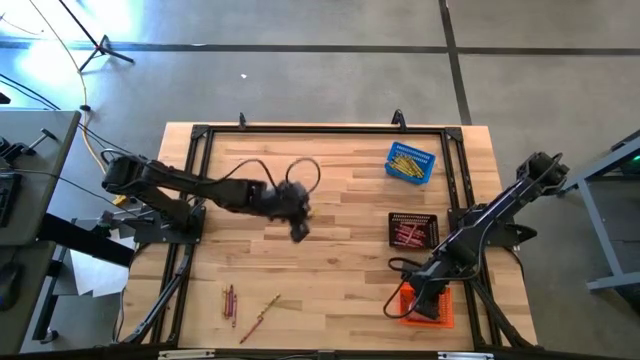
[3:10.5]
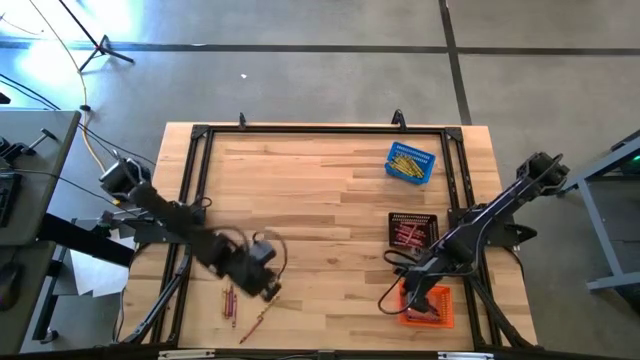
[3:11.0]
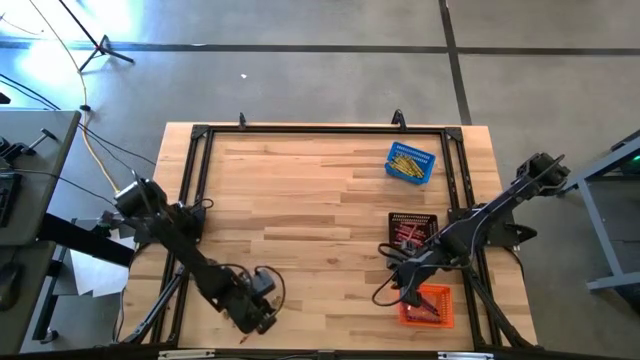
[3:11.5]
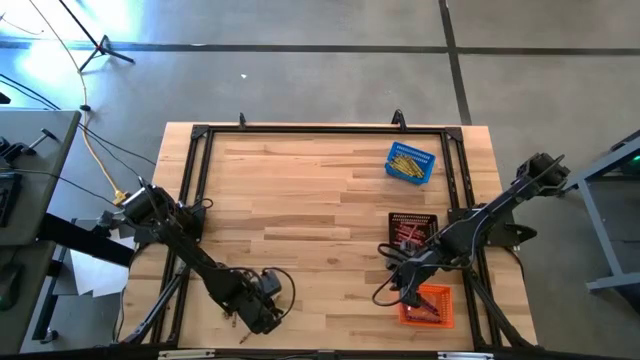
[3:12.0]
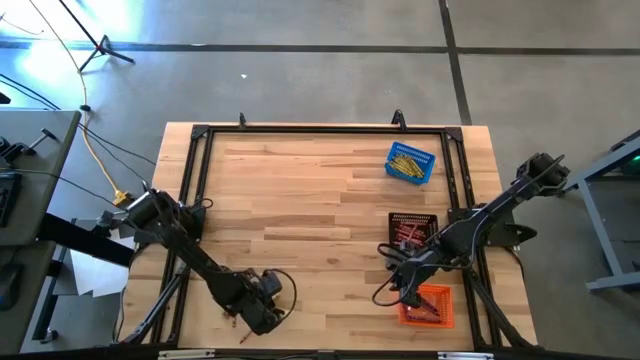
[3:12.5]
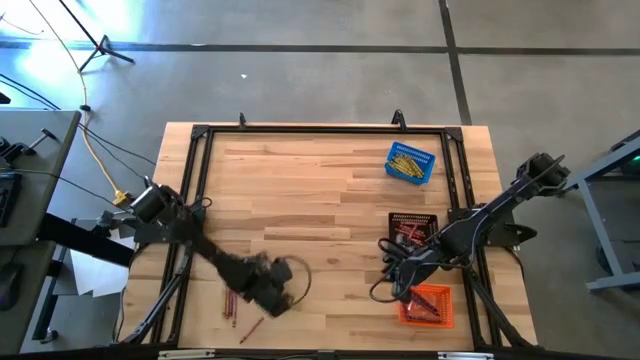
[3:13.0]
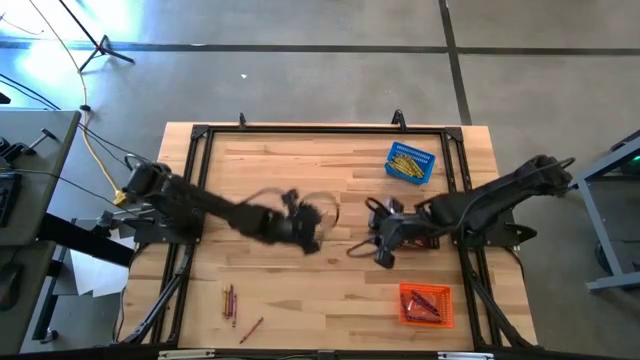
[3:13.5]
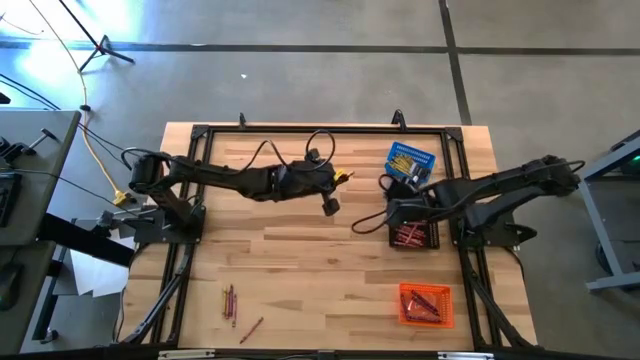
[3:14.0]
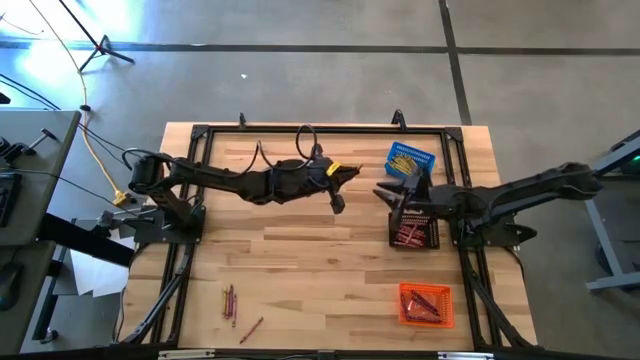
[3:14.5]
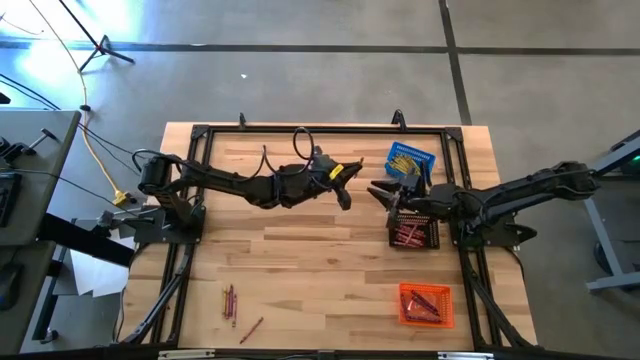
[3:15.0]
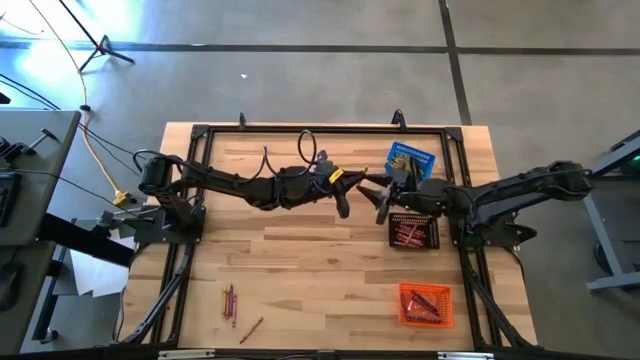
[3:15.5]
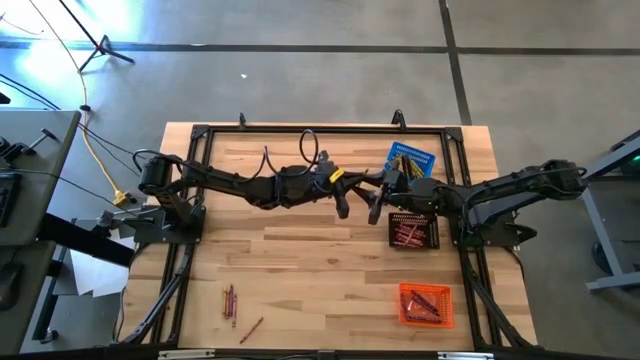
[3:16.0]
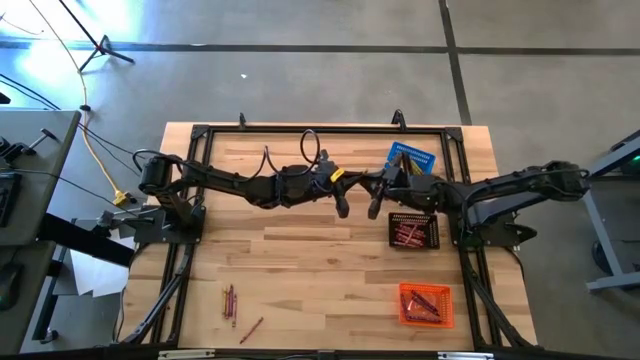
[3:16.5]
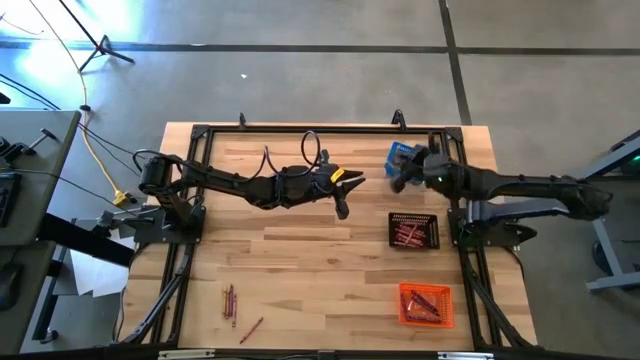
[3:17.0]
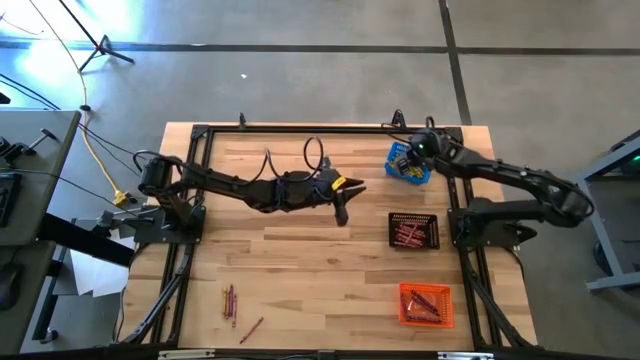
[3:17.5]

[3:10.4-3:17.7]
Task: Sort crayons
Put the yellow crayon into the blue bin

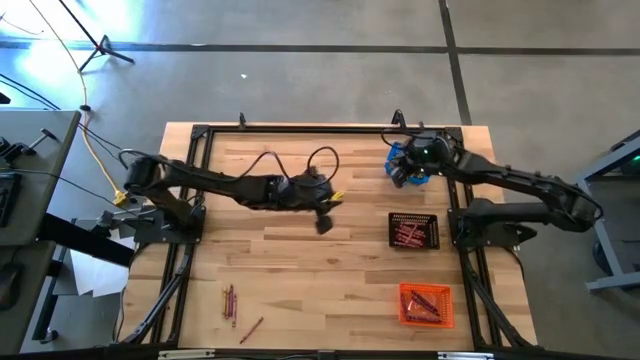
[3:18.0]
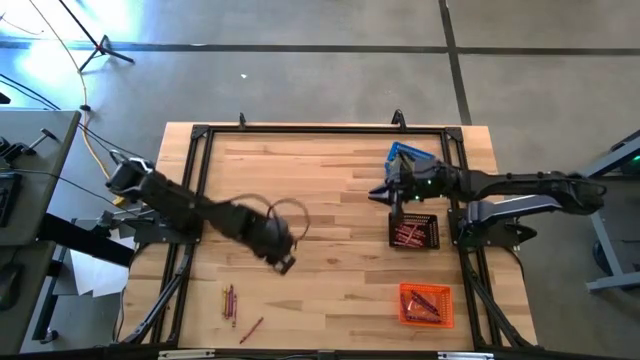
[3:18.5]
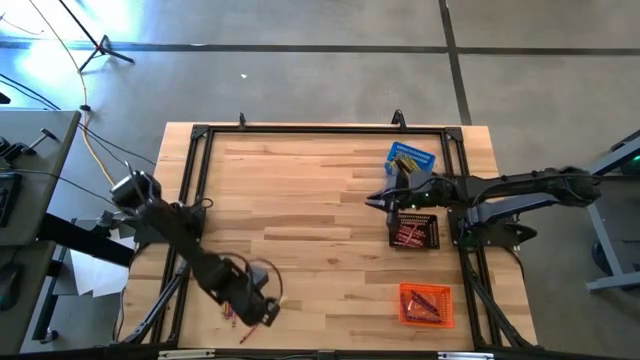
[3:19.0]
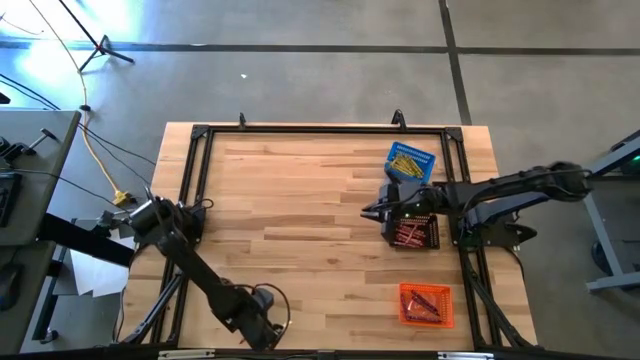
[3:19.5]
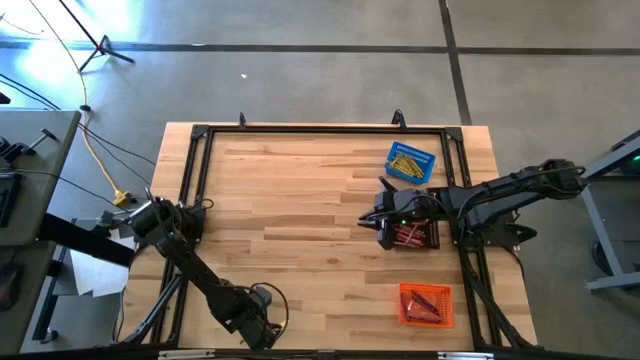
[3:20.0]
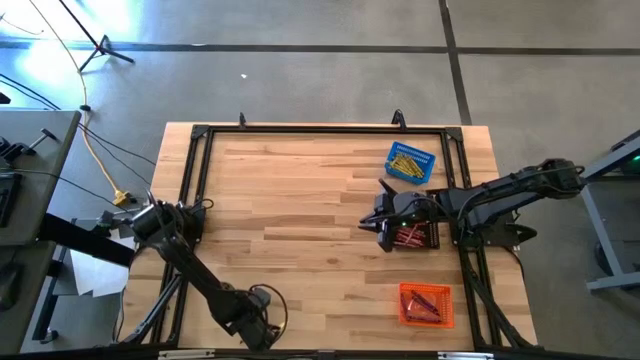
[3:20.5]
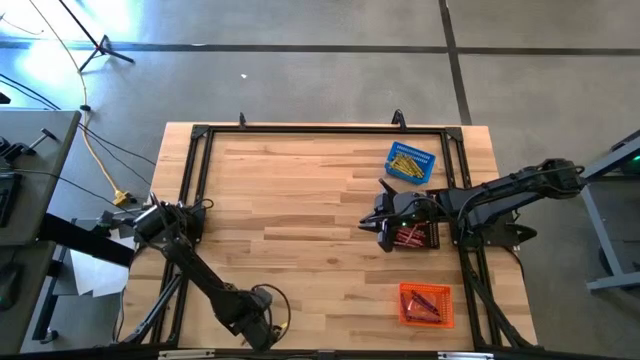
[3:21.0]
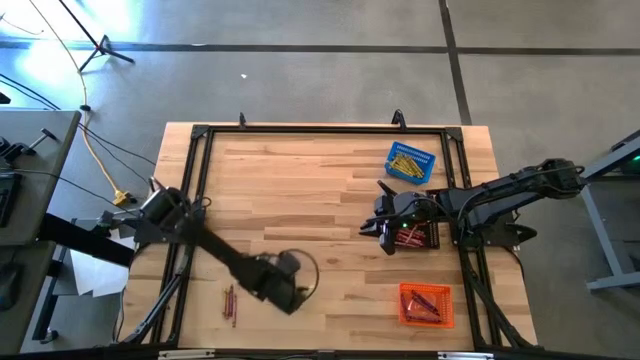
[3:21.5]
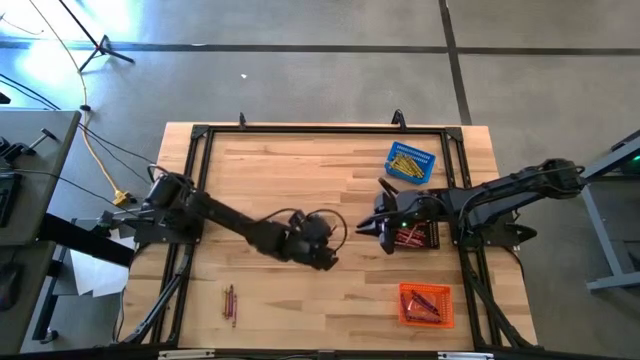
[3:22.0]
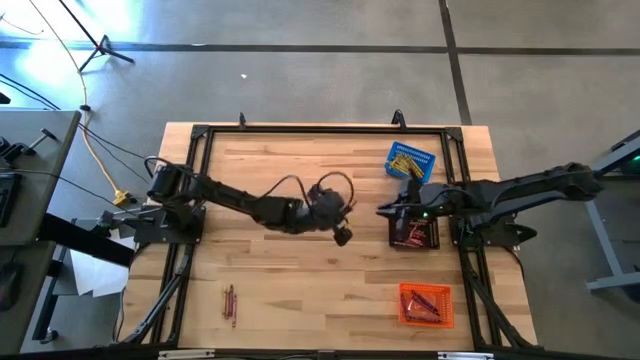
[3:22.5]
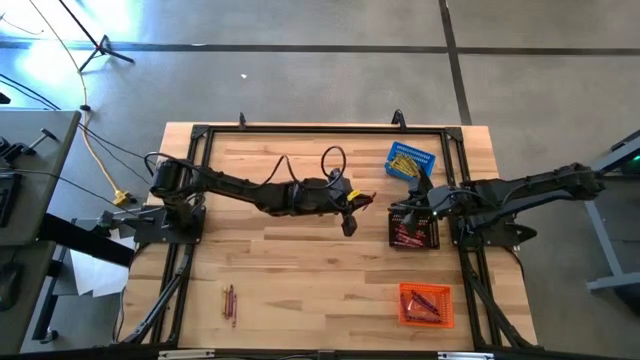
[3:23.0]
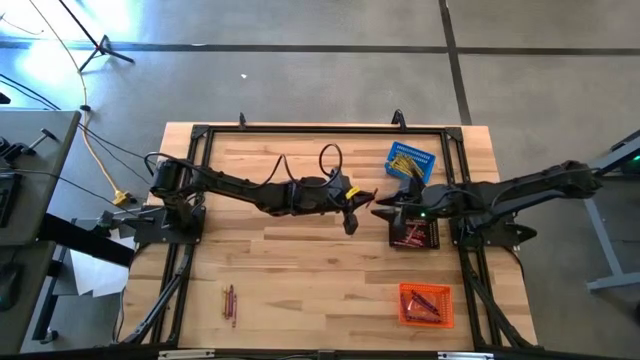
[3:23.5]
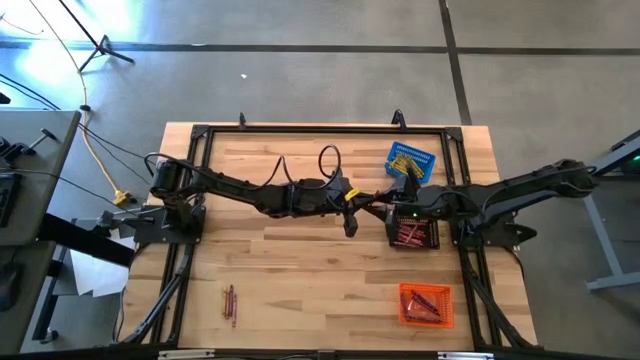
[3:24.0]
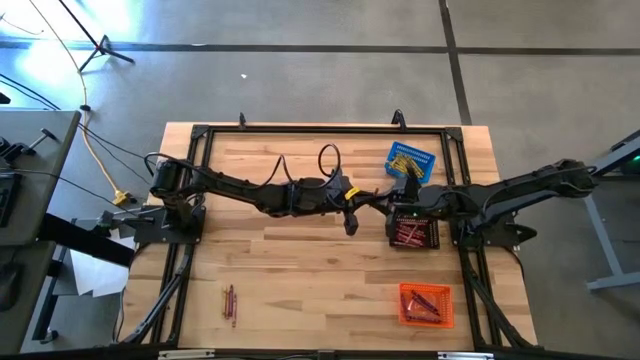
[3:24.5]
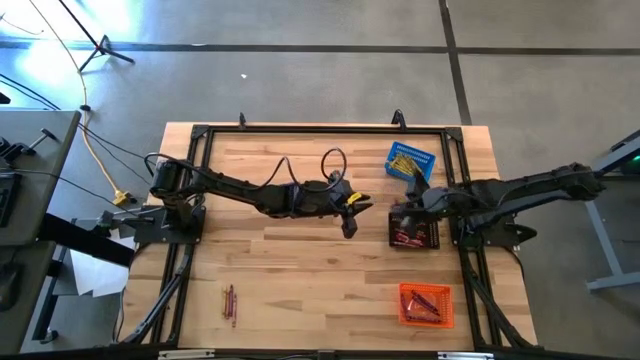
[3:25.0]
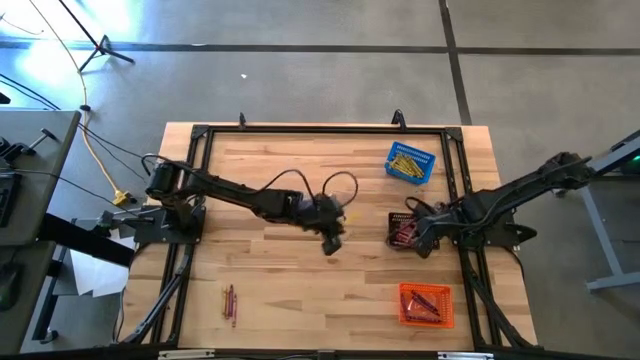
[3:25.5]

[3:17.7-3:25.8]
Put the red crayon into the black bin

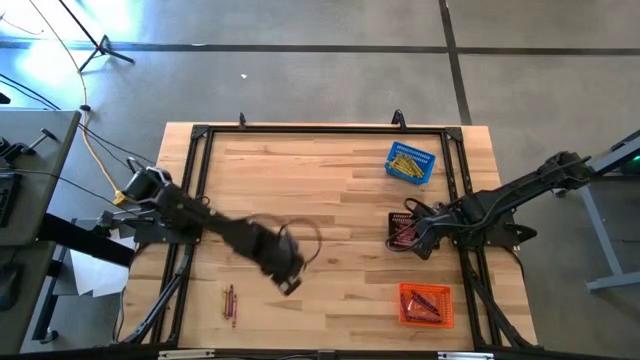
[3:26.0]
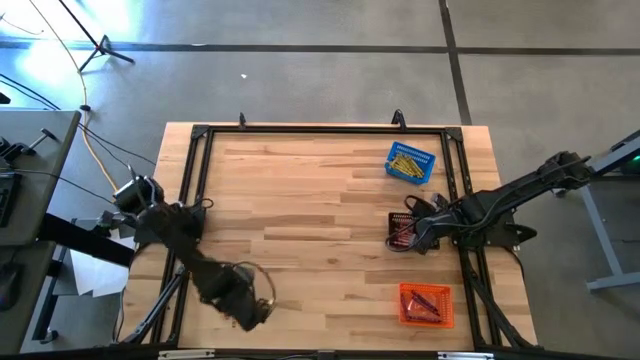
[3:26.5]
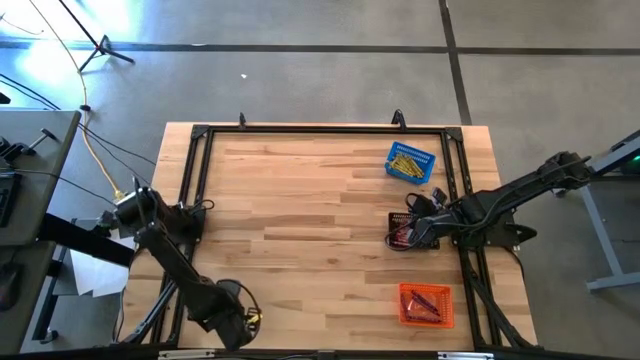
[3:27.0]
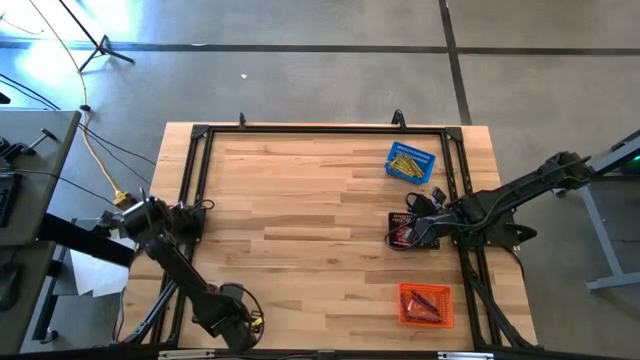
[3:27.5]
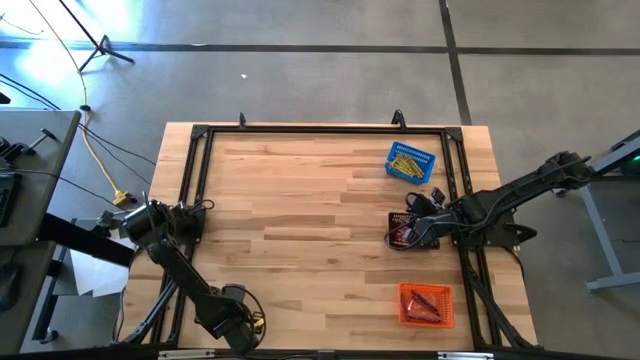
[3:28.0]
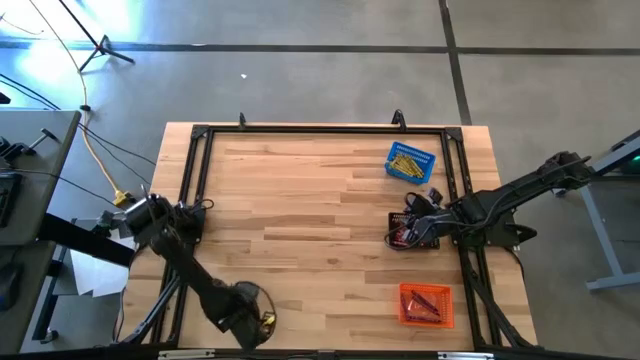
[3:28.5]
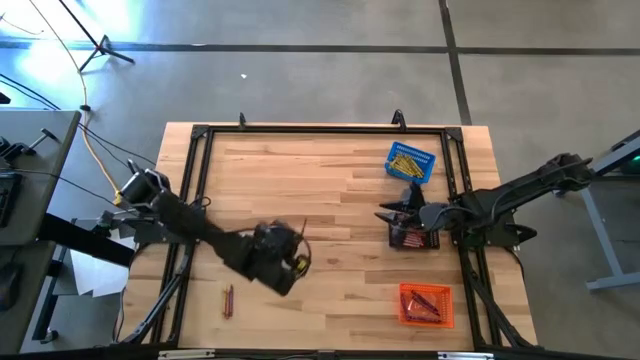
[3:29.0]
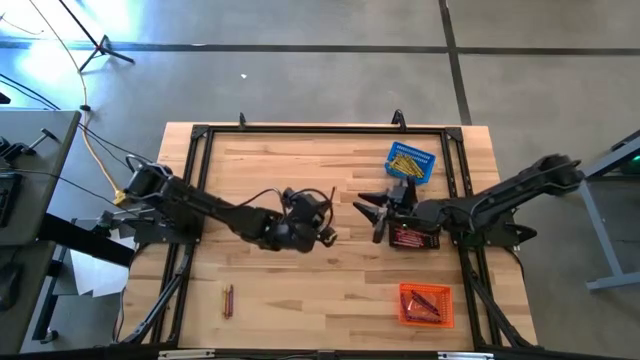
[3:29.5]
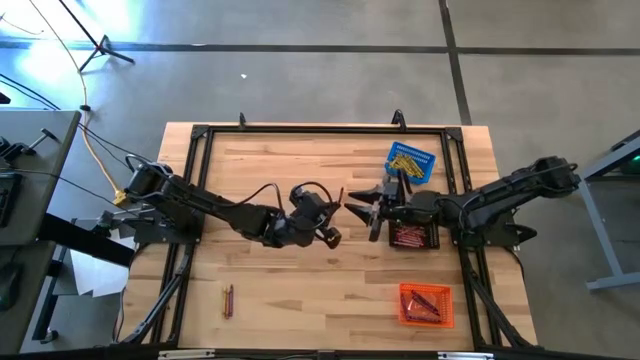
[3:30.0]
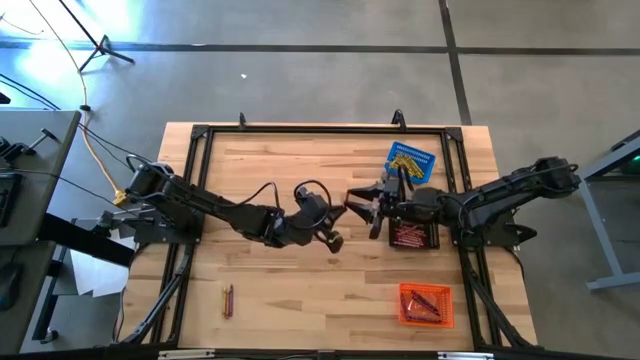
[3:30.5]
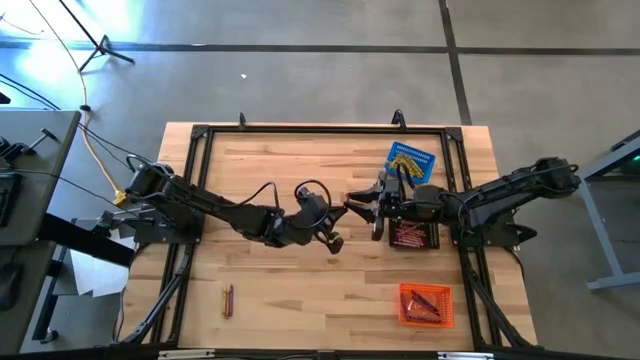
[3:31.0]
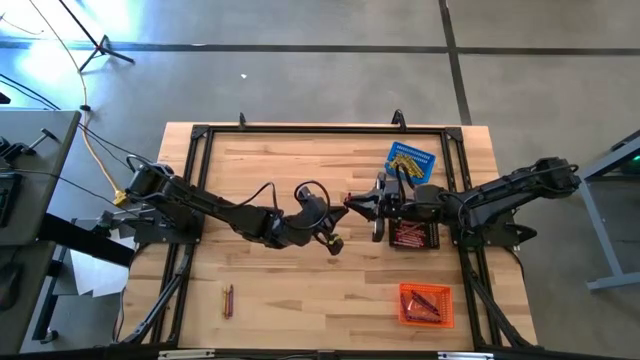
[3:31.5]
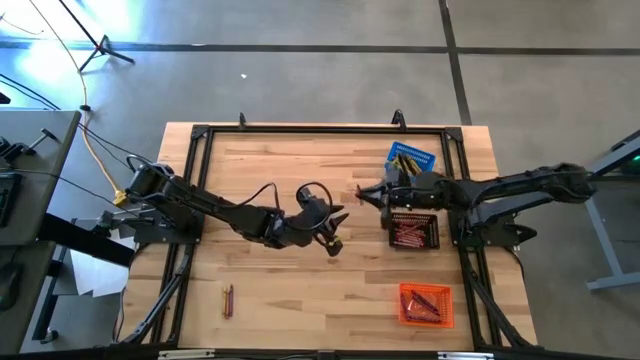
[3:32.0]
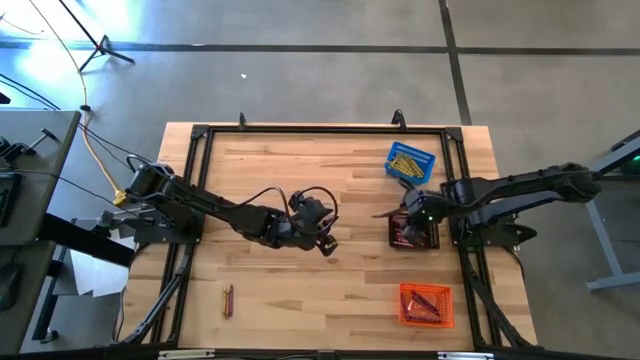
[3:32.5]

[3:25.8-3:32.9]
Put the red crayon into the black bin
